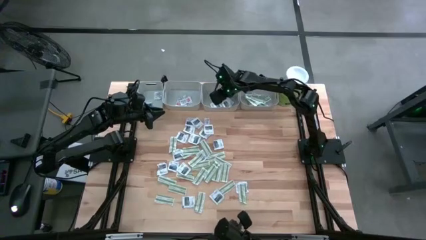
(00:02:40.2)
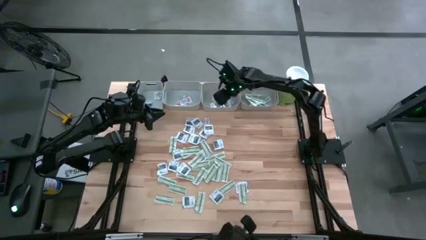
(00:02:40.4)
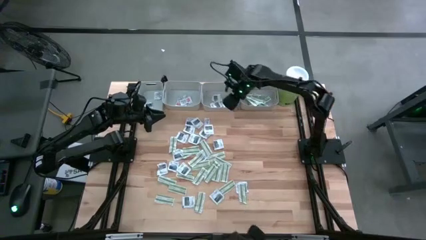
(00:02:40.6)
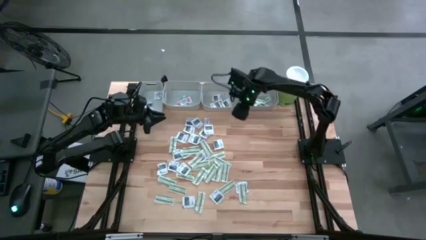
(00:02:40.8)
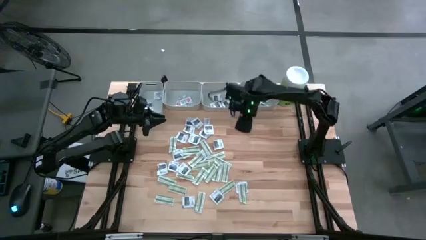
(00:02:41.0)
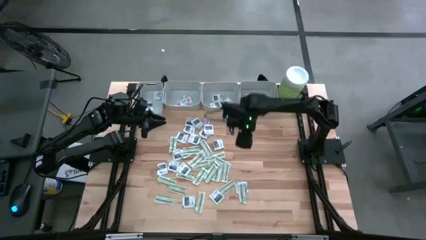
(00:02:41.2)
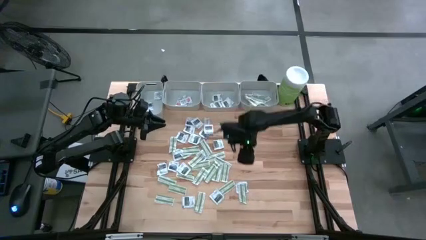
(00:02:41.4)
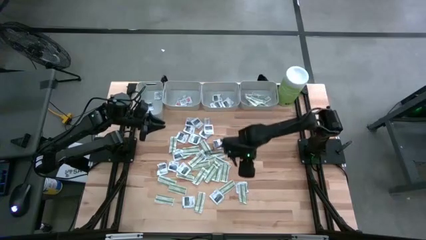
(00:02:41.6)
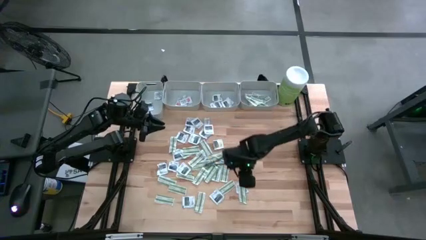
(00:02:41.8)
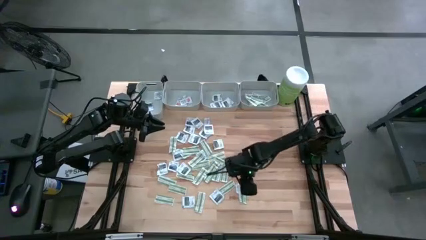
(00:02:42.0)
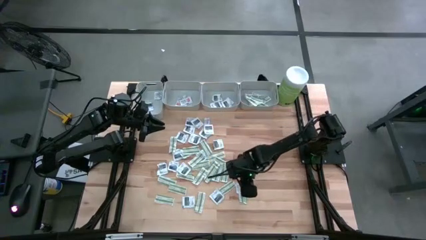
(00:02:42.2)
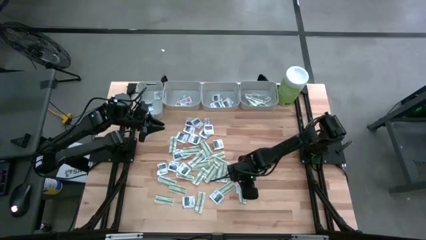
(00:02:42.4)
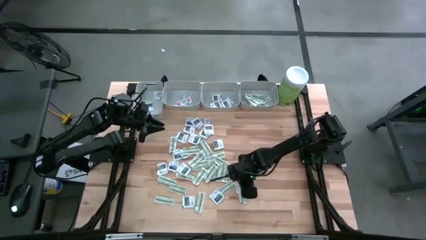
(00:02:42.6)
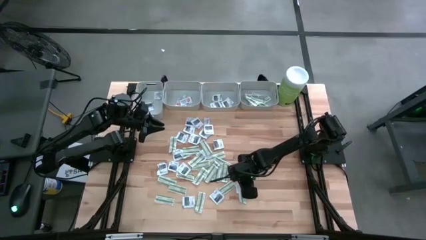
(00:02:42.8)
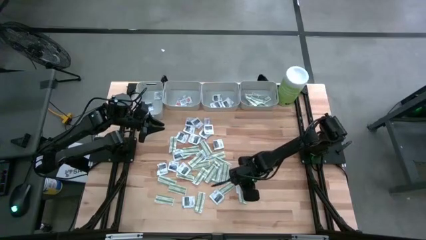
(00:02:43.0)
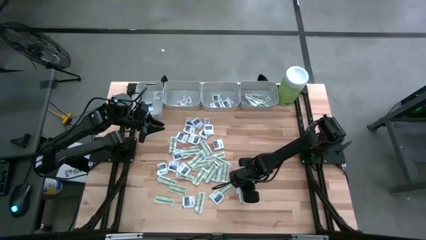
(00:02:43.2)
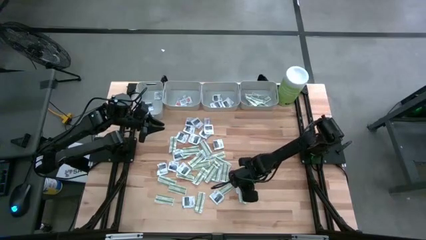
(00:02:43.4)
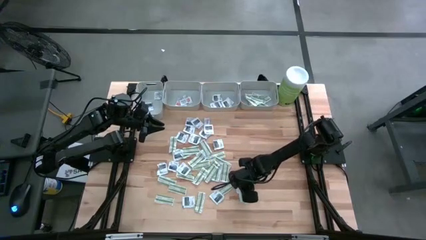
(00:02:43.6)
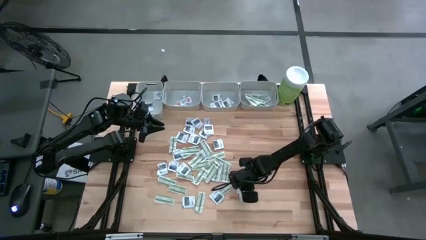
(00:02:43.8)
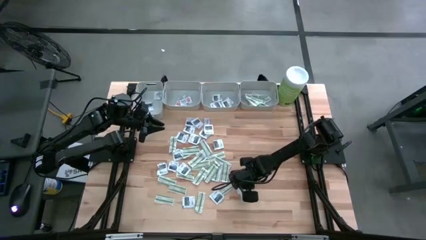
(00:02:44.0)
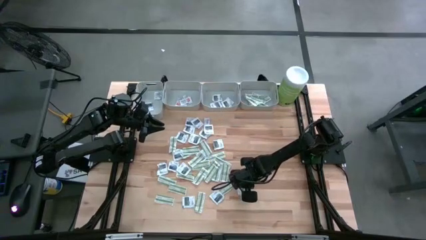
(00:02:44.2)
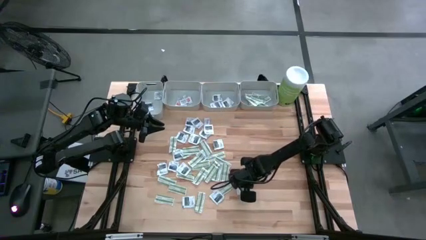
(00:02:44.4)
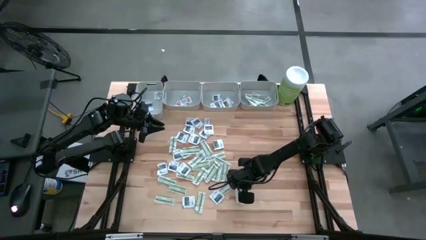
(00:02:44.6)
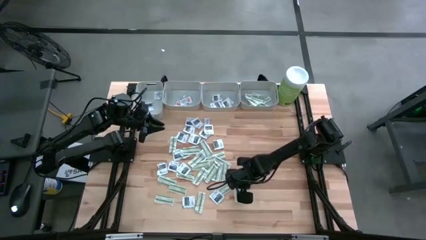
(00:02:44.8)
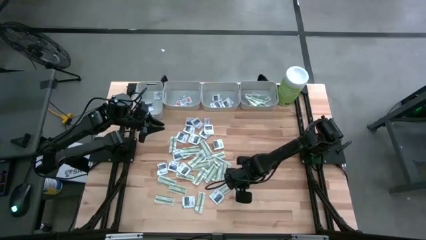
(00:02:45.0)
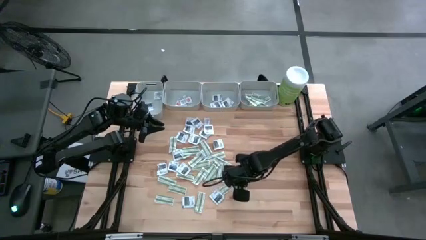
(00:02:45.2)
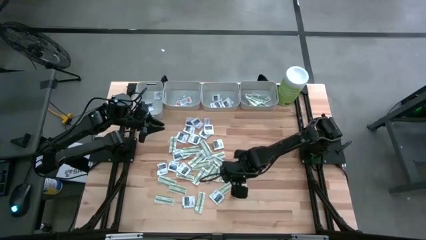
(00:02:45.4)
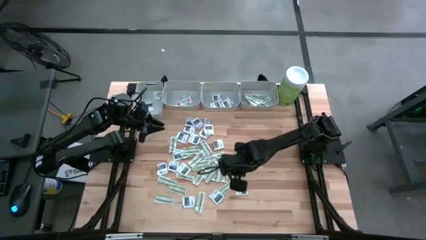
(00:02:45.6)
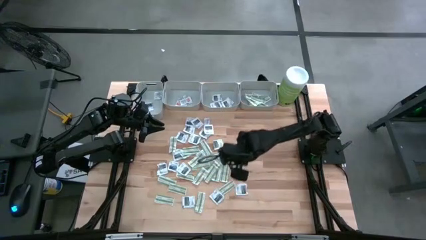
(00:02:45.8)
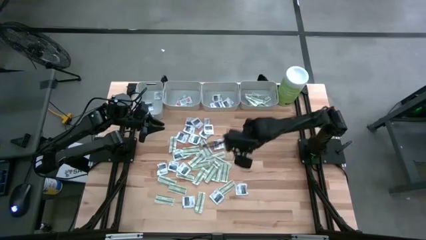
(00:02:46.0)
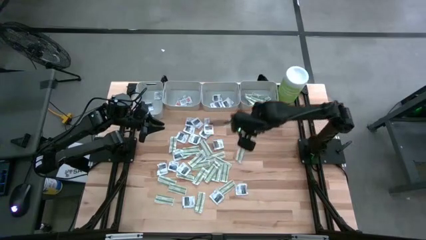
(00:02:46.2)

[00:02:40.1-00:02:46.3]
Task: Pick & Place First Aid Supplies
Put the green bandage into the right gray bin

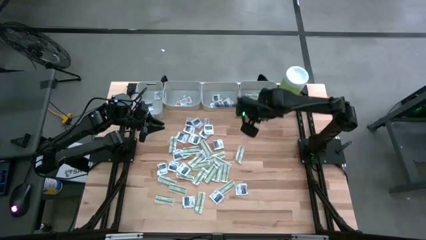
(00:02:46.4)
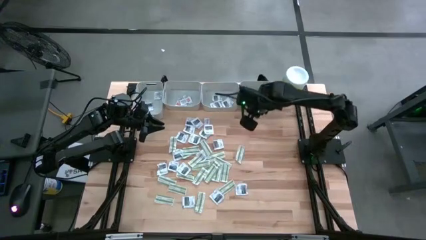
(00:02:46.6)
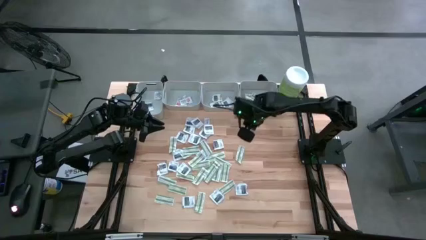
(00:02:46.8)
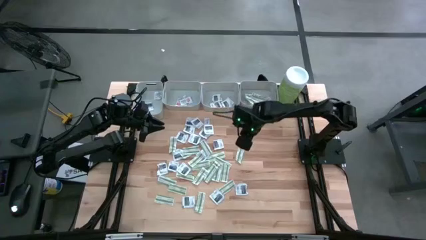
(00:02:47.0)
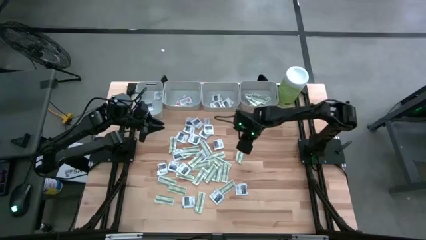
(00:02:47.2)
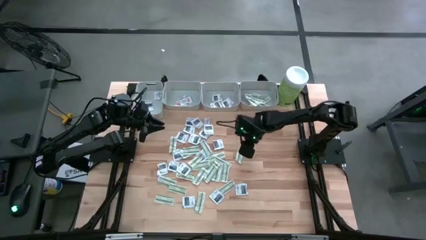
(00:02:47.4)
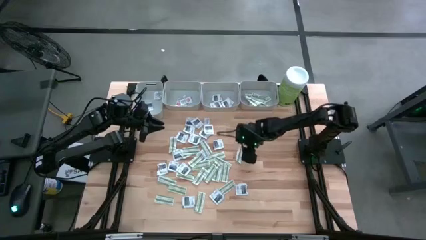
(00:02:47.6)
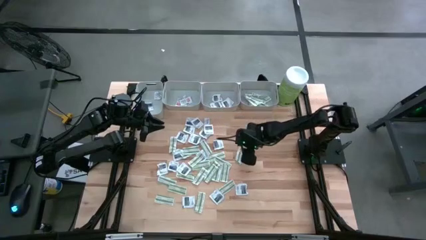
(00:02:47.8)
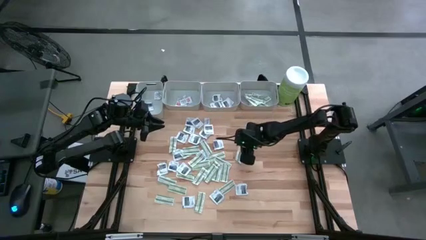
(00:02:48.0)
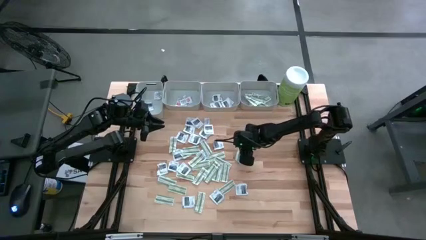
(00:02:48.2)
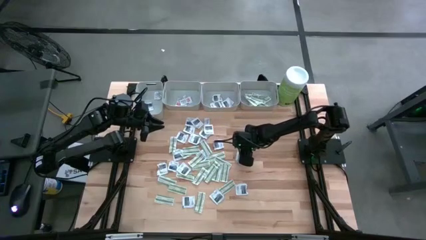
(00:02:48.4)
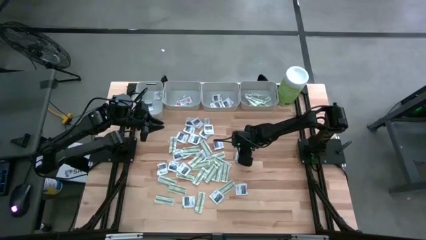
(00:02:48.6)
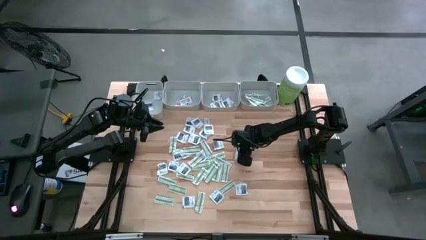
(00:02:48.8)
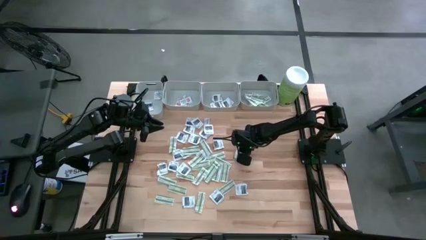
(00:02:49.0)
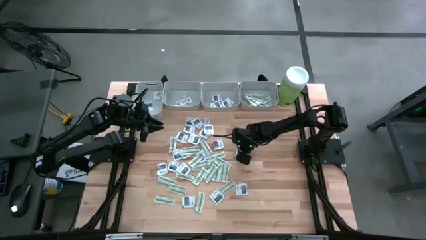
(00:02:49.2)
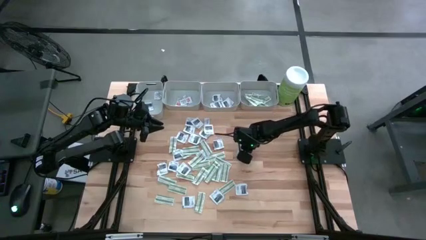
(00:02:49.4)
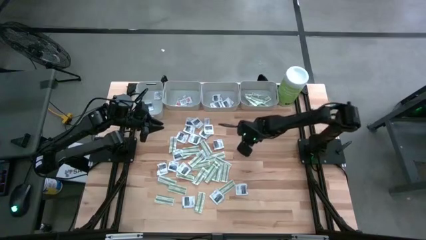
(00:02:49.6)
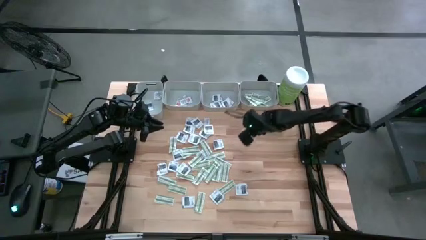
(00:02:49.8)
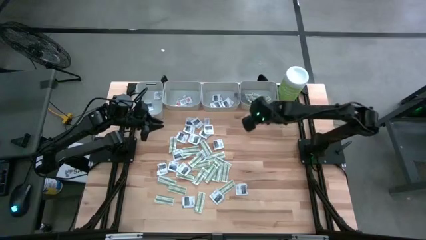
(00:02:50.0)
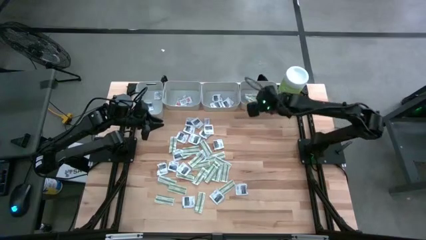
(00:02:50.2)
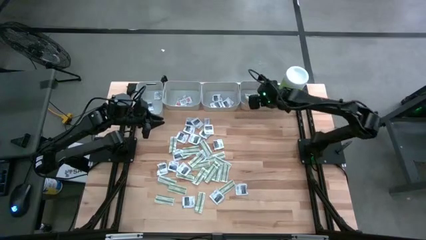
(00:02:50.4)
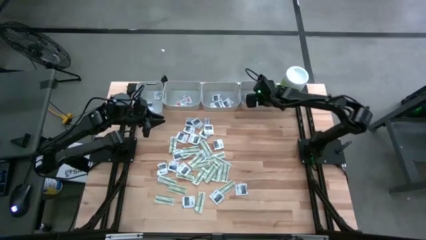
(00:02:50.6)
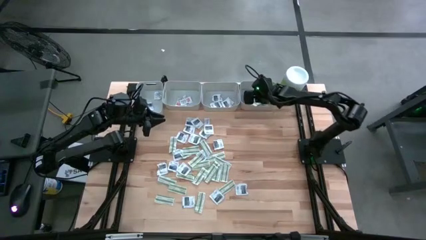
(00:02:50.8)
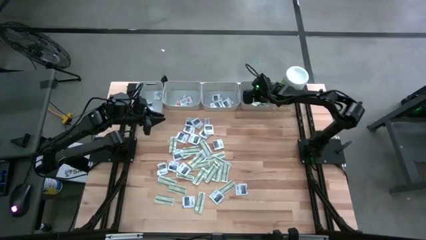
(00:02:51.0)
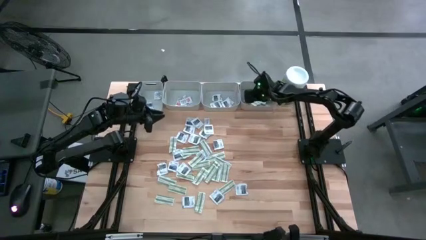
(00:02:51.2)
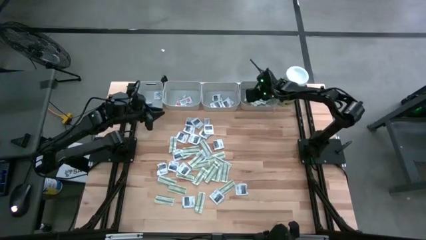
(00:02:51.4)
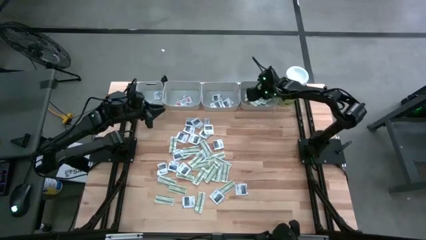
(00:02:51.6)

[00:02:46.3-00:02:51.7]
Put the green bandage into the right gray bin

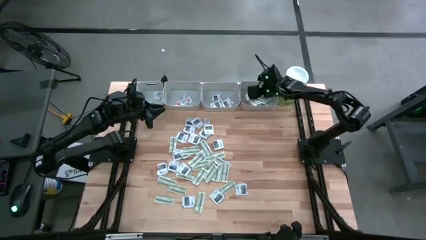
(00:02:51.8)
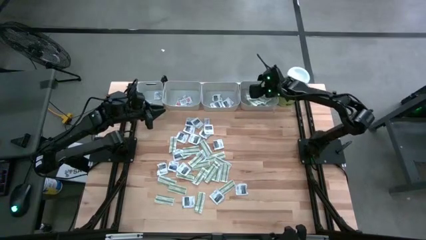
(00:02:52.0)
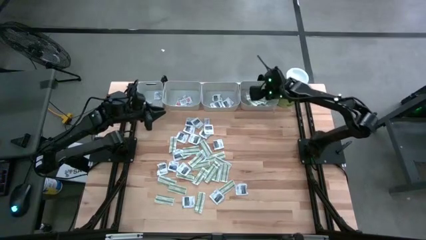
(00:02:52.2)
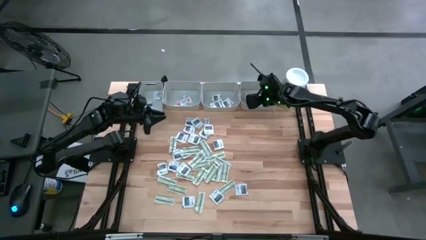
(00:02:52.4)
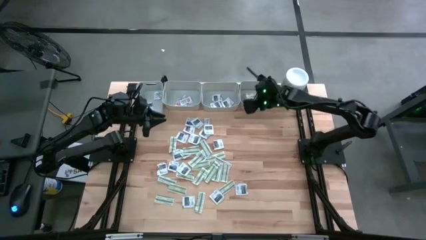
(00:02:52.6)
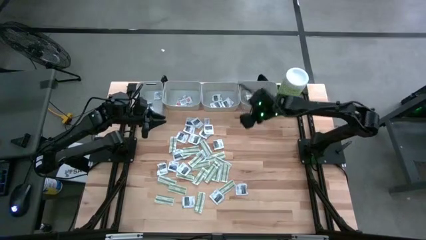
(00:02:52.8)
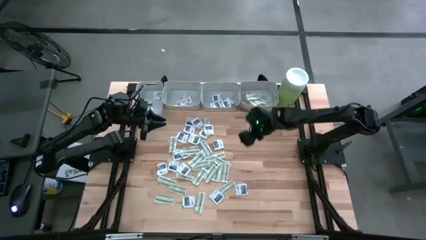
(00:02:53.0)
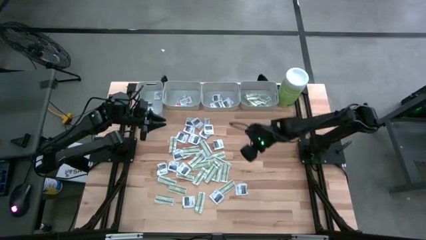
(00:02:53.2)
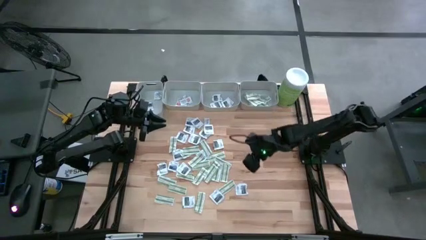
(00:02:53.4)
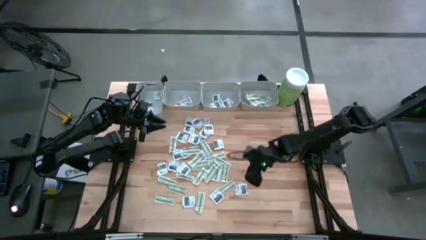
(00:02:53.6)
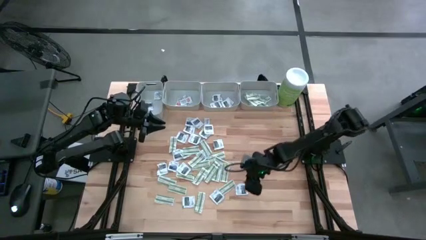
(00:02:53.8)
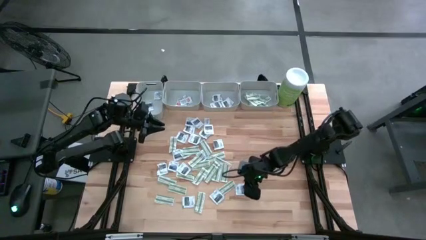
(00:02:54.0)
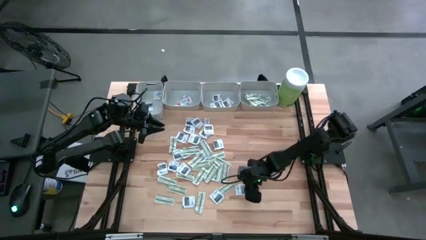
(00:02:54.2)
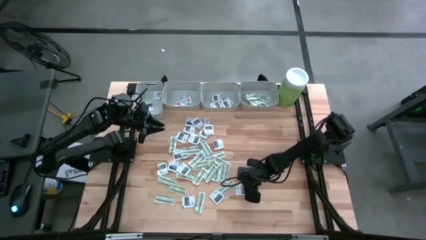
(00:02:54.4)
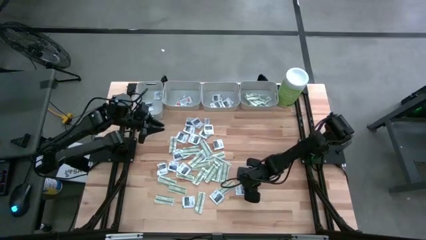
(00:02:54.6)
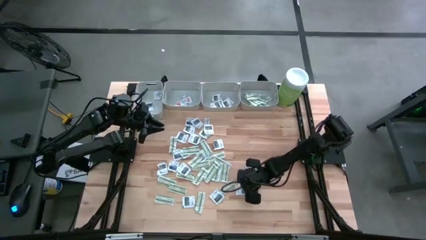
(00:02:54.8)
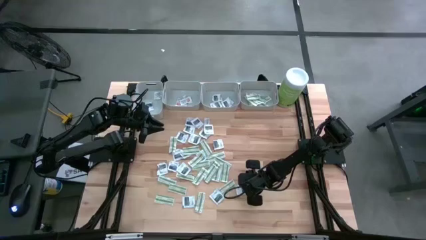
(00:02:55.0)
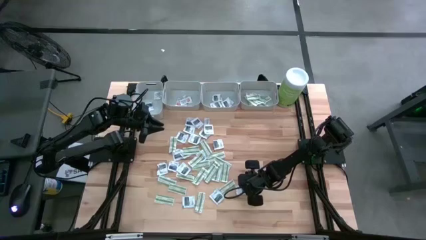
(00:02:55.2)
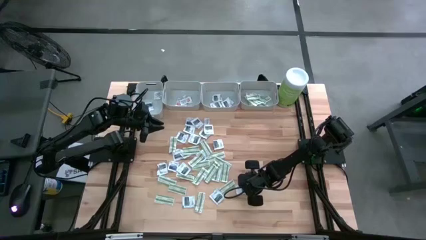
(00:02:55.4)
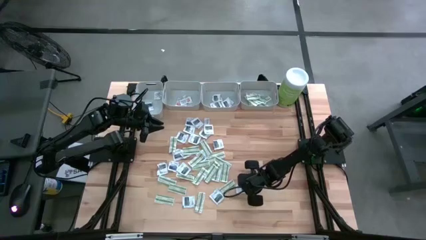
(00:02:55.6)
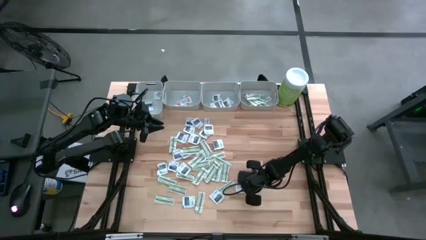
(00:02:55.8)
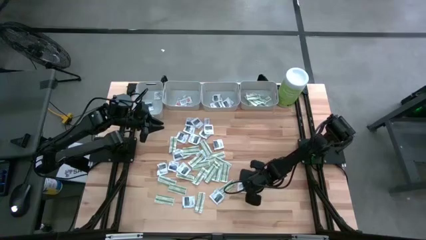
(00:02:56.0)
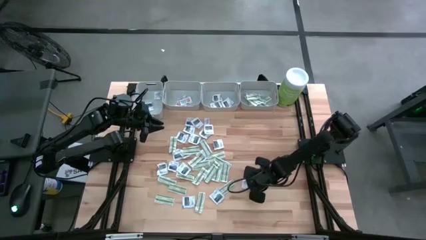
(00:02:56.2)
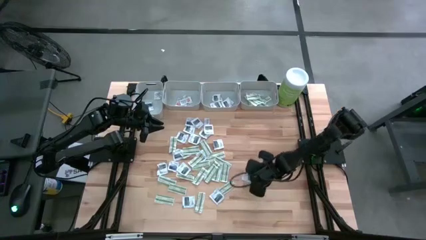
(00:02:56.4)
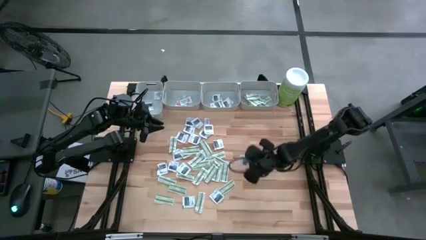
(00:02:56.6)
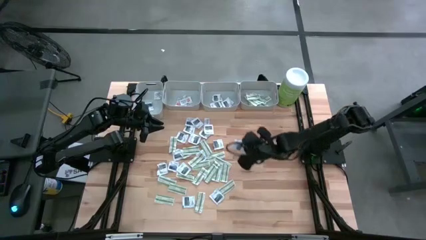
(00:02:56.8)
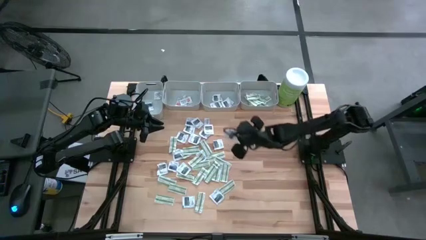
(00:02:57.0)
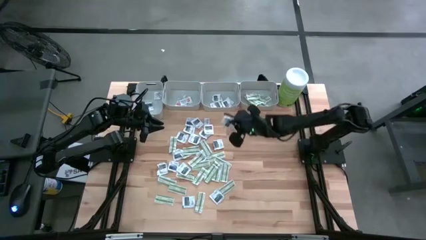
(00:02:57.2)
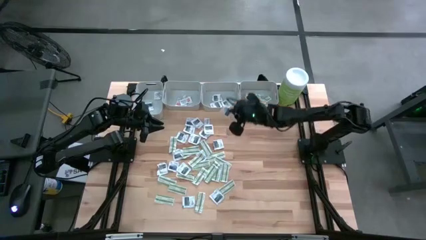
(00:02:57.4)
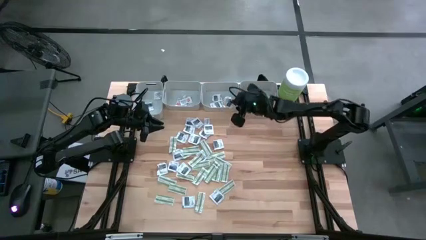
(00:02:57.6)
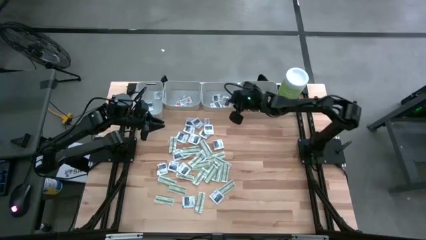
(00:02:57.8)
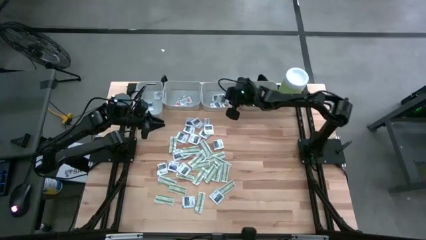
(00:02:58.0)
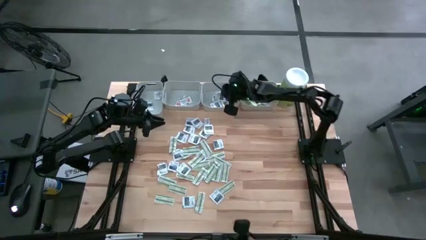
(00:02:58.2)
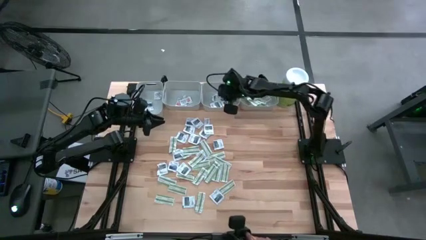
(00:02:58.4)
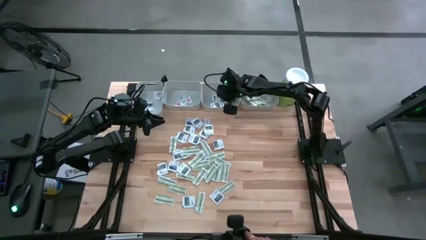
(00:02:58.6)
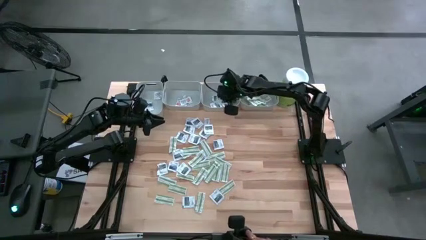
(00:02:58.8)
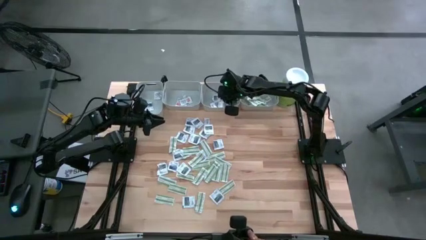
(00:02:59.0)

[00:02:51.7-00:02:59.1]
Put the gray towelette pack into the middle right gray bin
